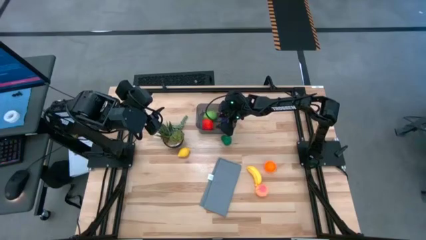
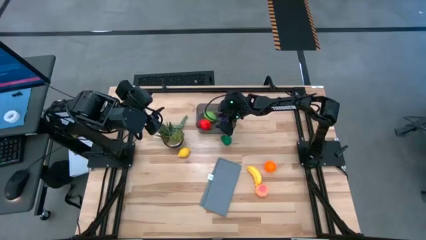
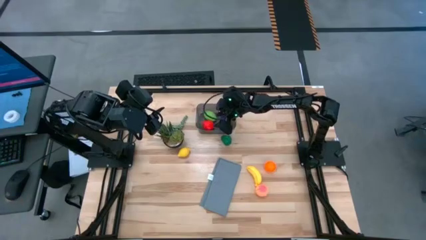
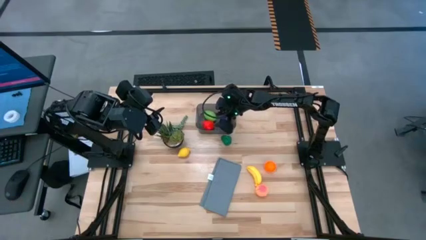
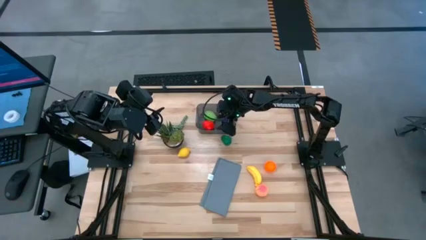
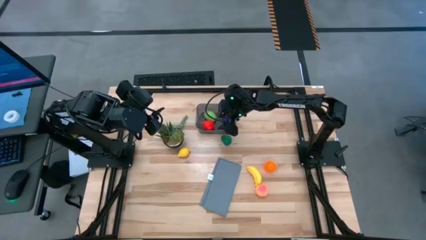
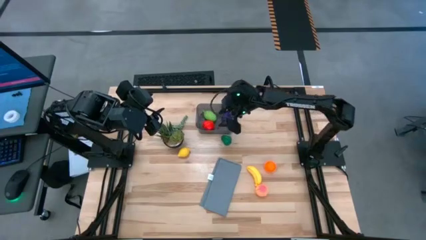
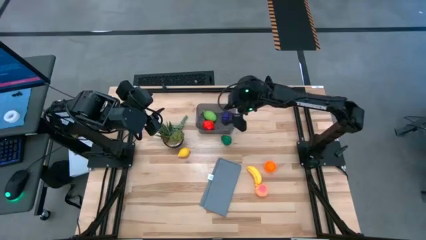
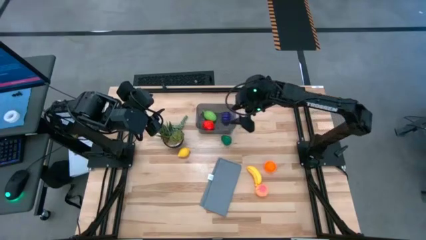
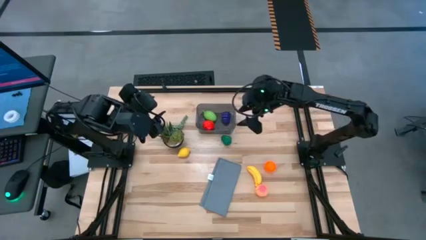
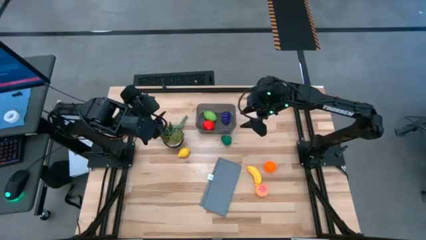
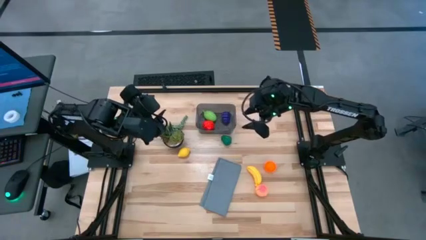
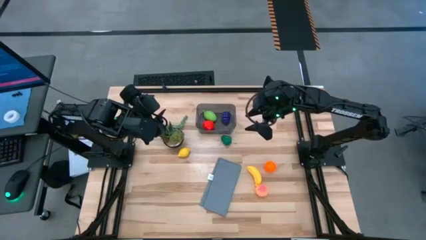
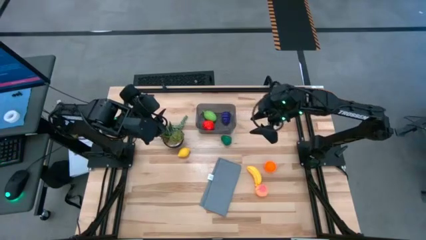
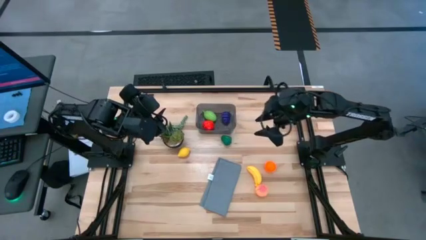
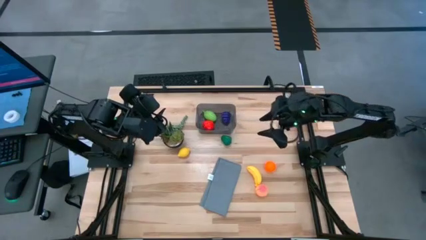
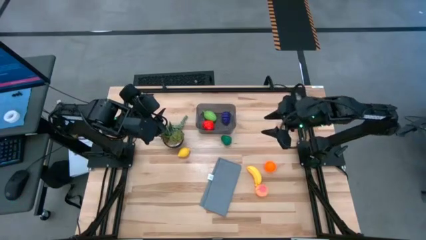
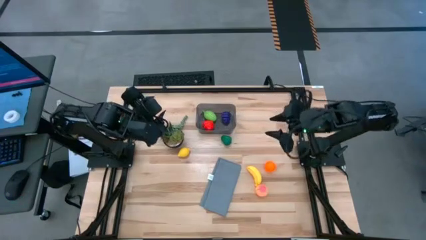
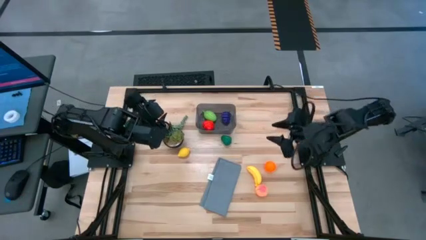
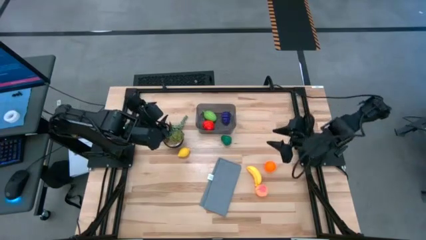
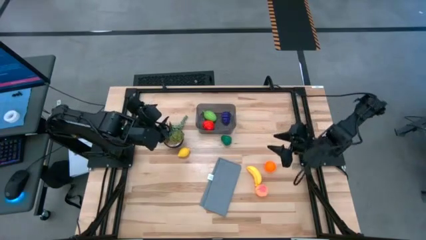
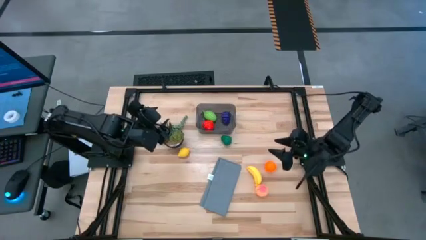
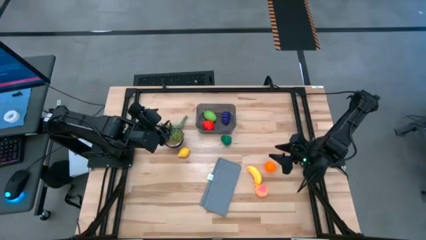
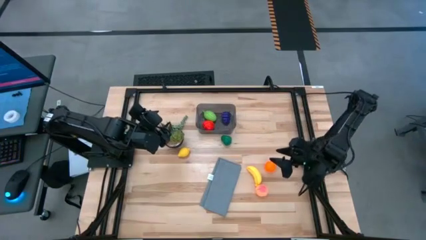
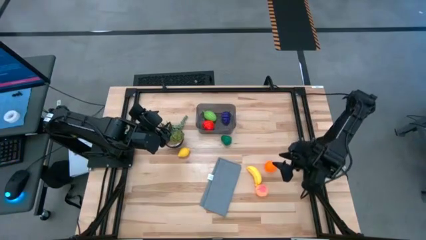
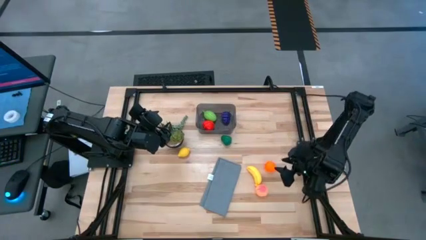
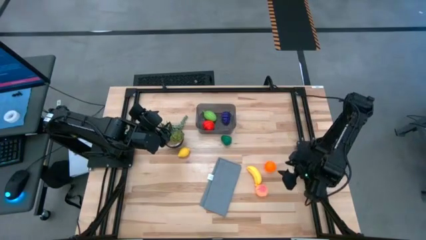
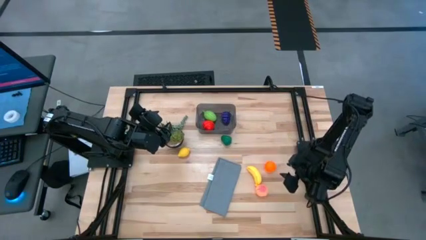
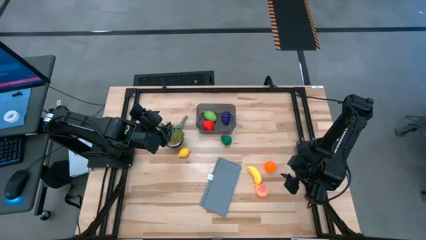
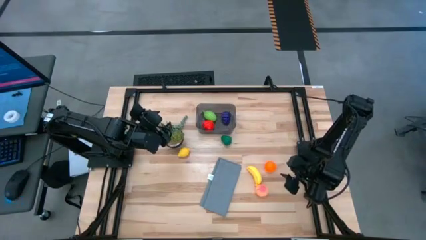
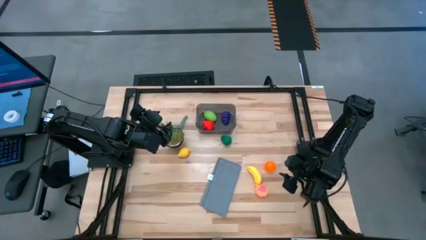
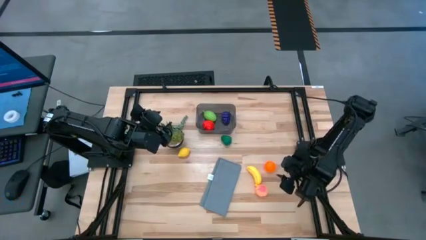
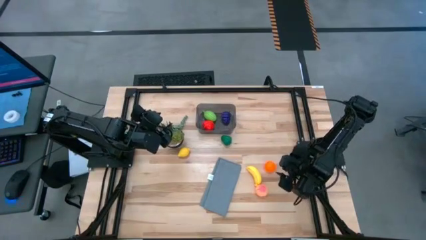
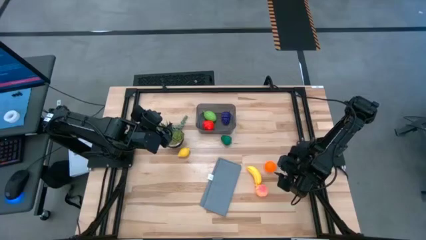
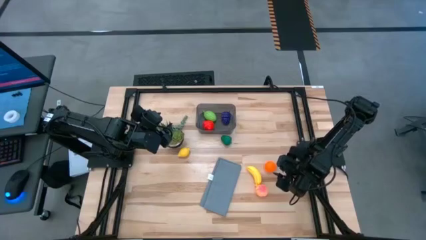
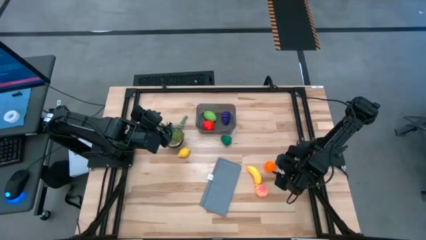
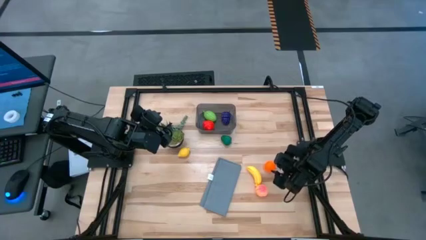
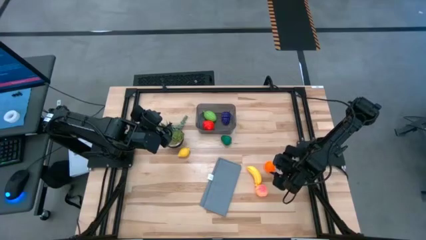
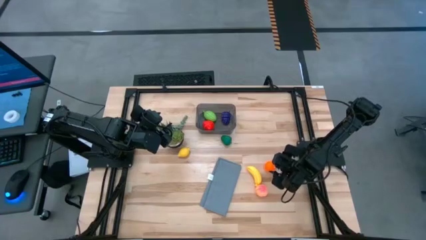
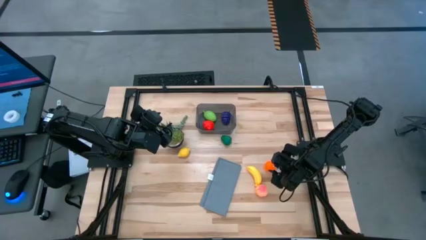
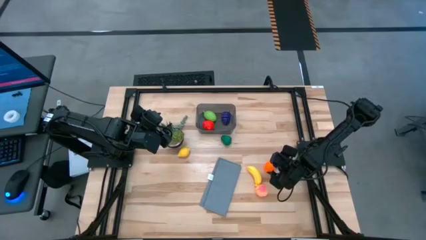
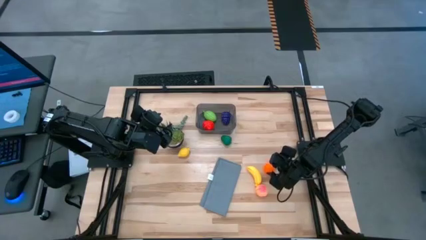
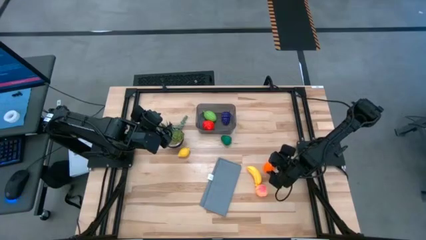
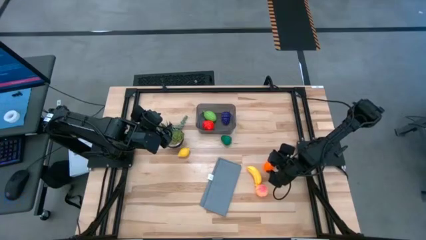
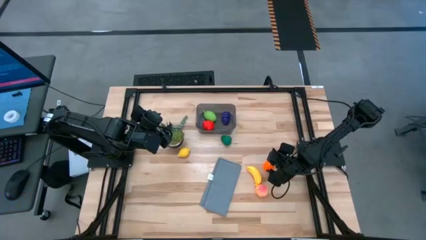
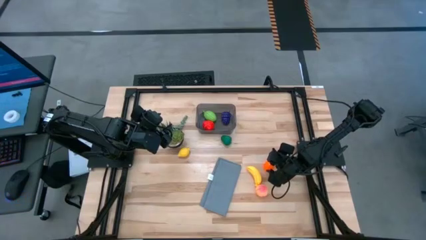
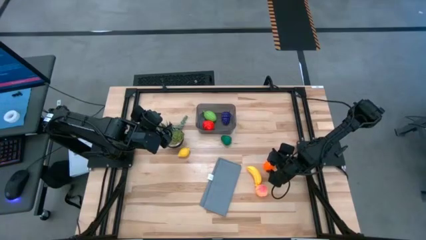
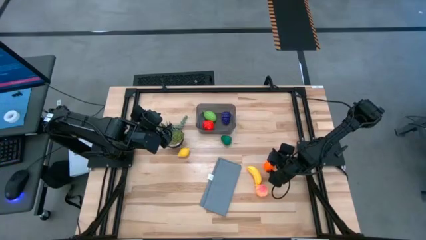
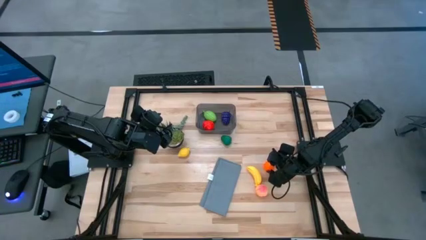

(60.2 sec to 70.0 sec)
Task: Pick and placing Produce into tupperware
Put the pumpkin into the black bin

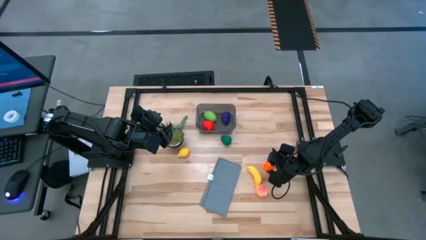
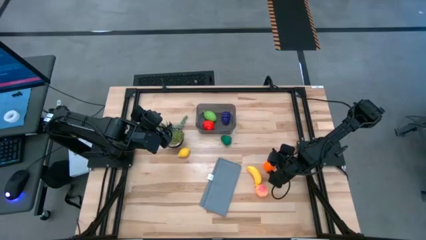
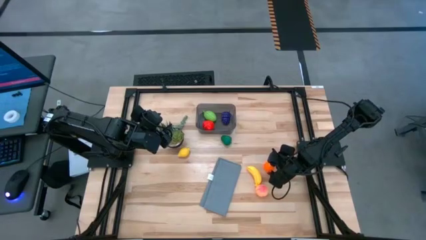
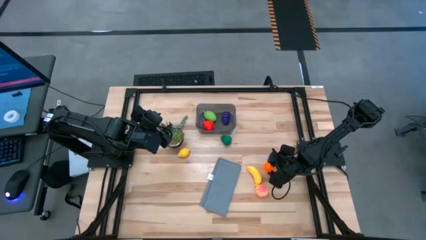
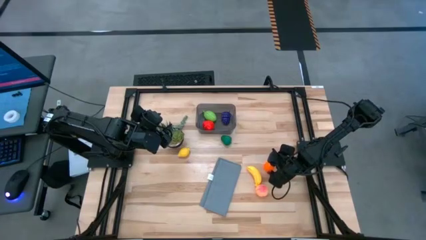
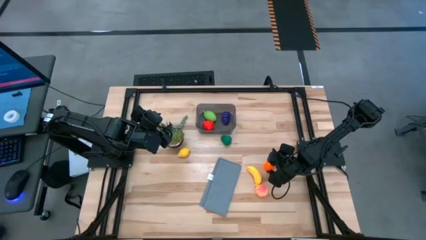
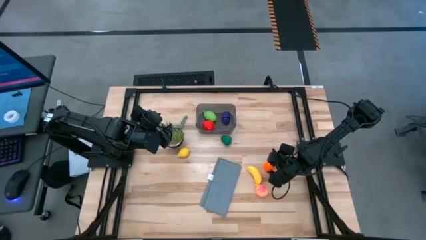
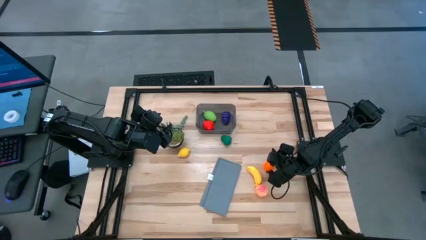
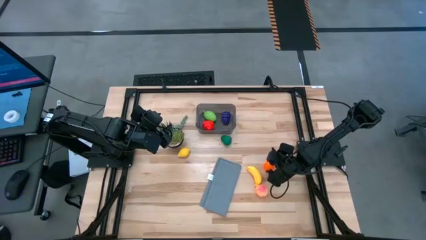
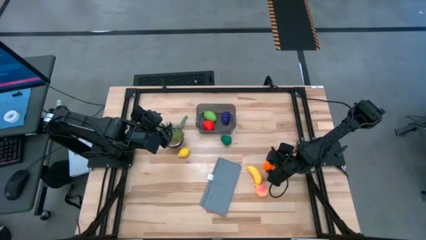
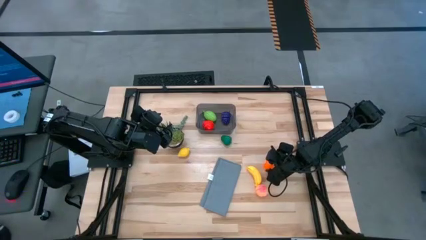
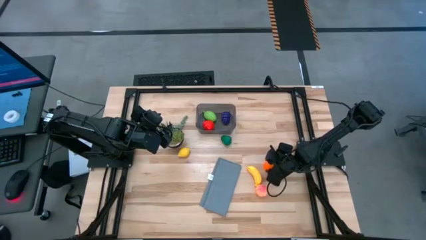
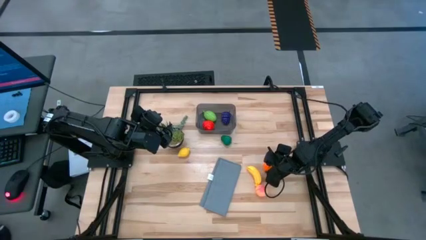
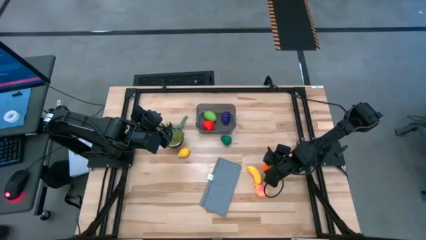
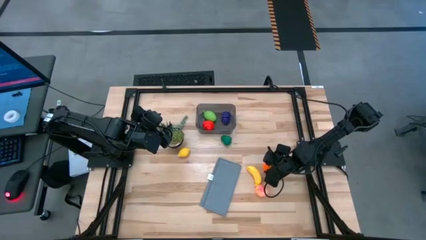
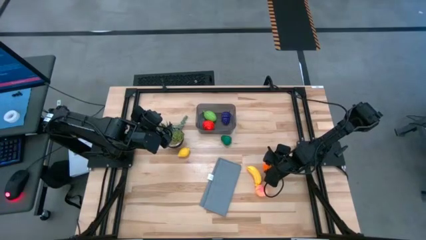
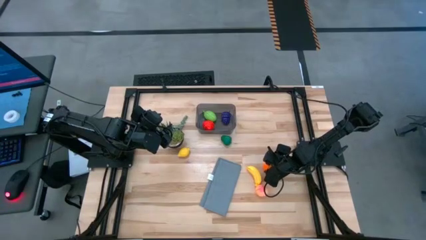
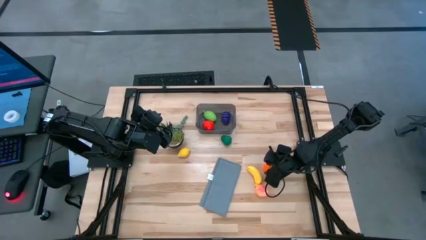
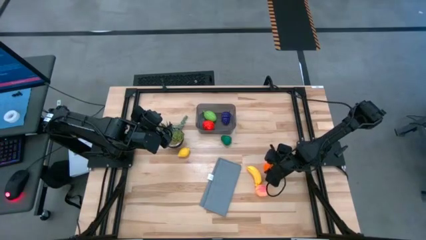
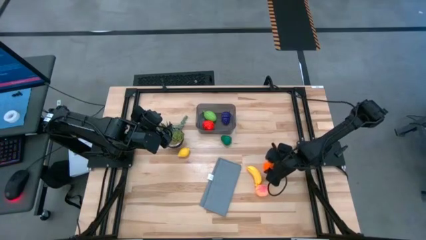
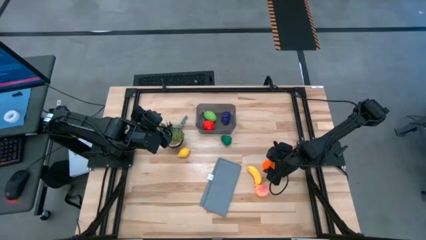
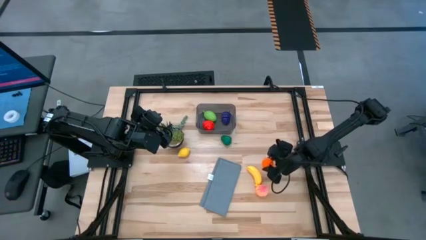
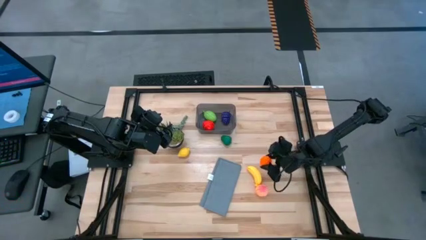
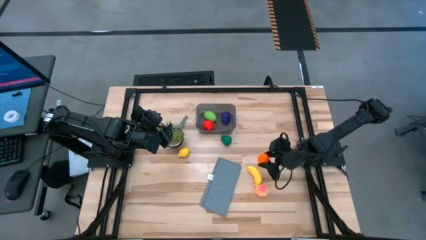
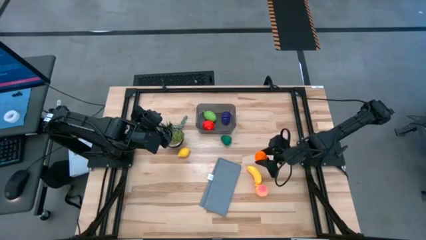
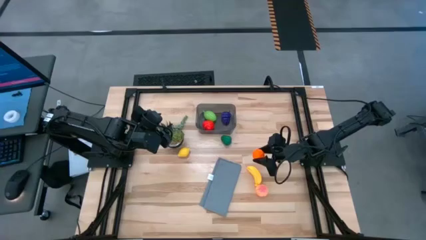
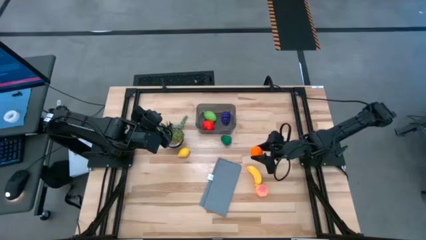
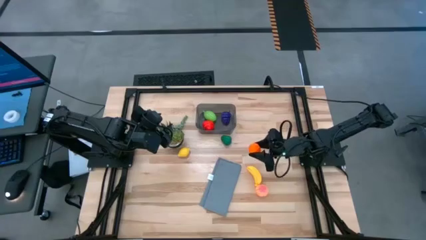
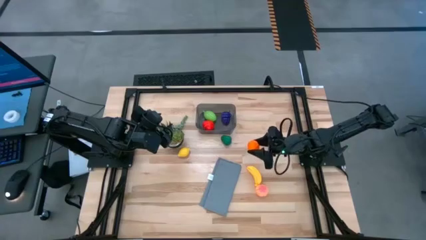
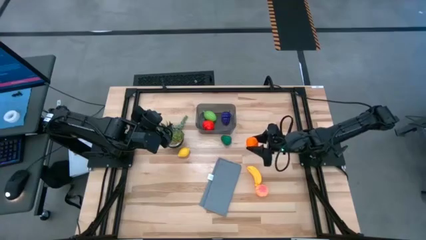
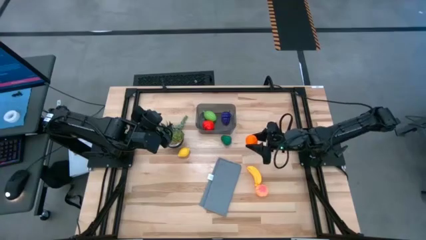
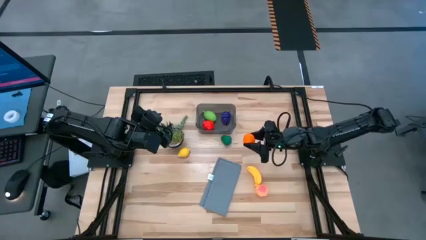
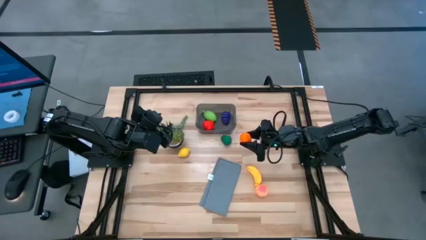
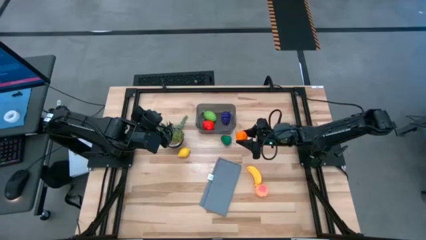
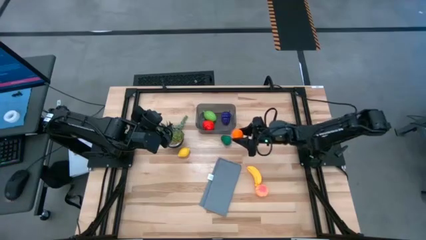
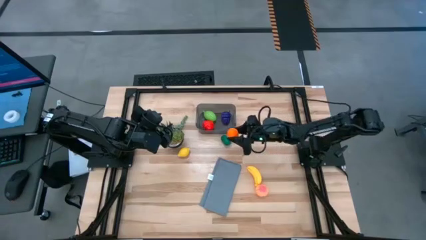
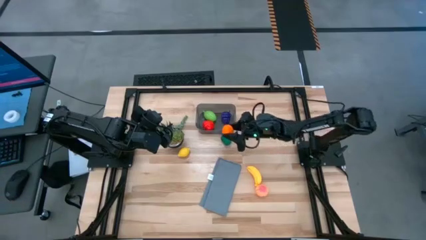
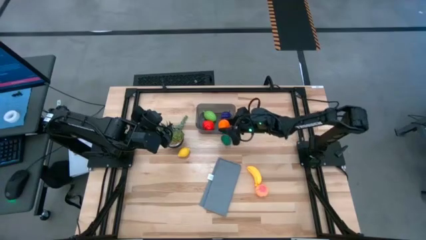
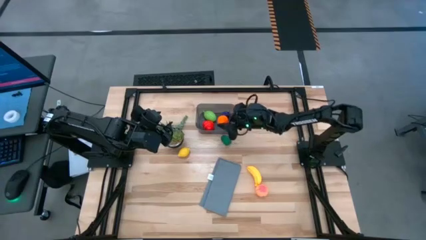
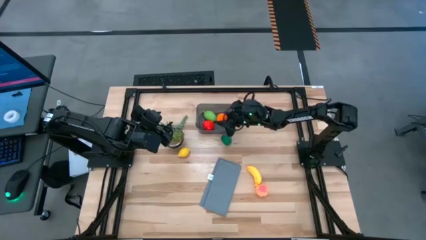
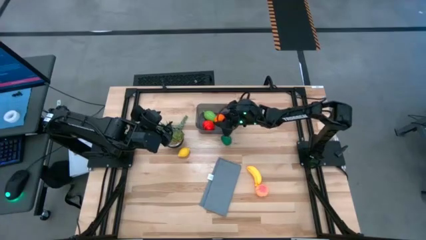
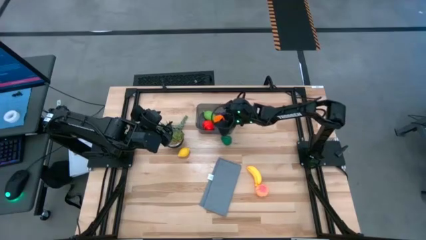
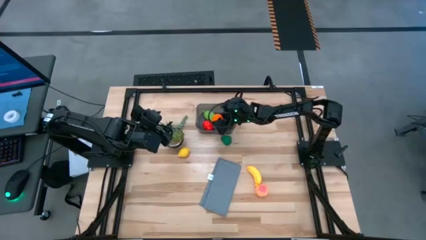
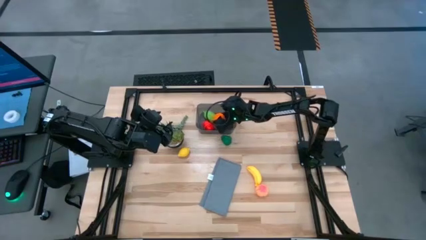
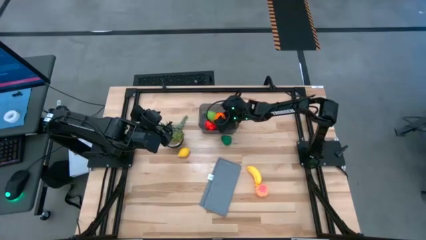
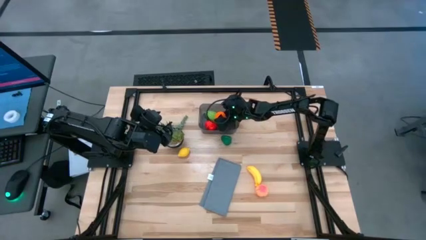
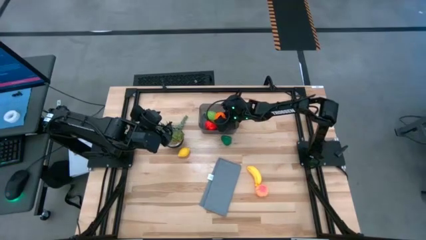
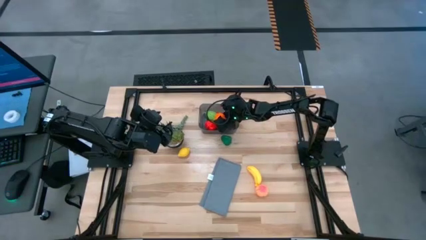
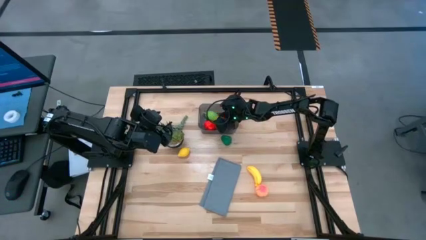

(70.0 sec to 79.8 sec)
Put the pumpkin into the black bin
